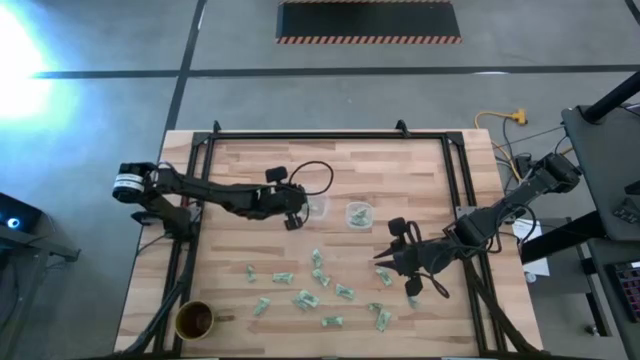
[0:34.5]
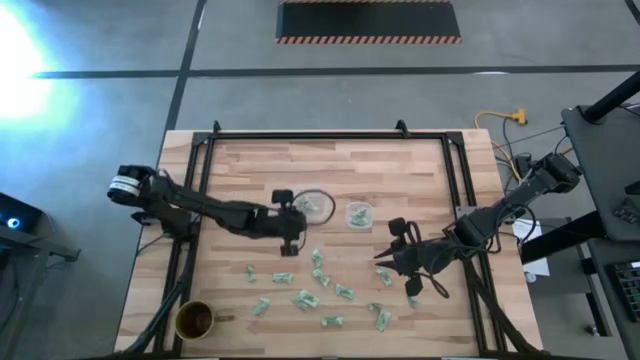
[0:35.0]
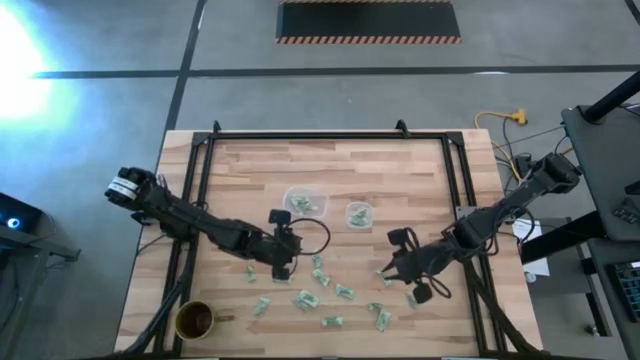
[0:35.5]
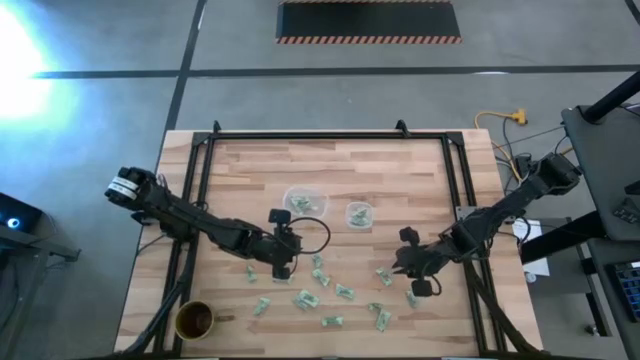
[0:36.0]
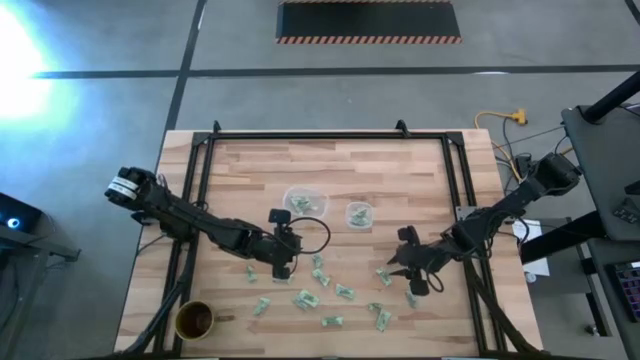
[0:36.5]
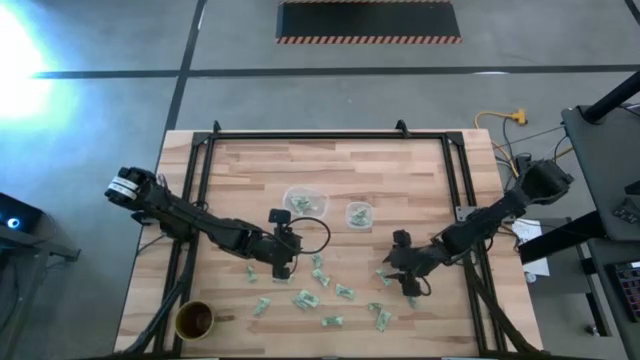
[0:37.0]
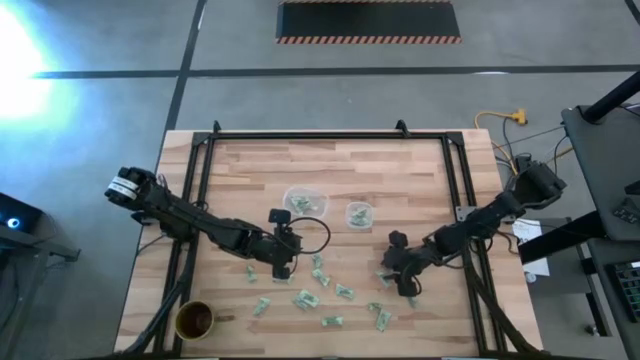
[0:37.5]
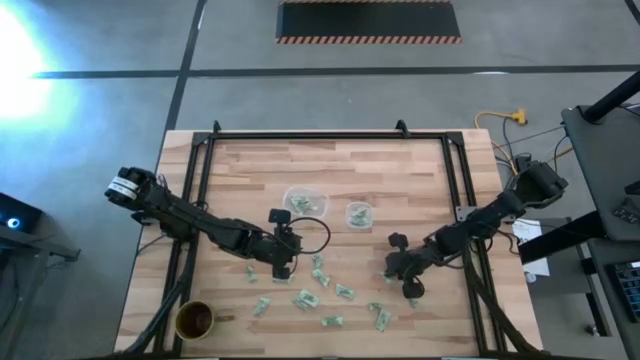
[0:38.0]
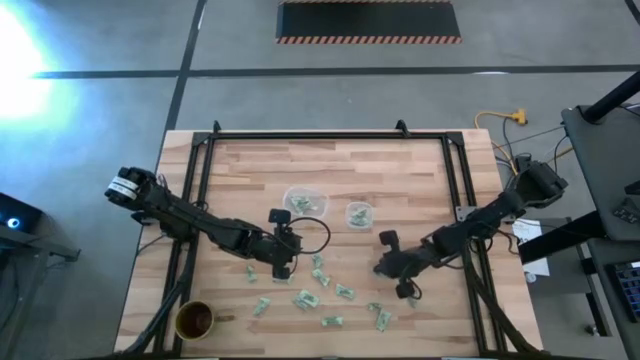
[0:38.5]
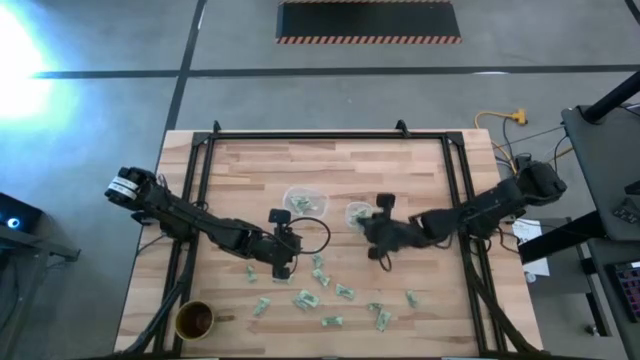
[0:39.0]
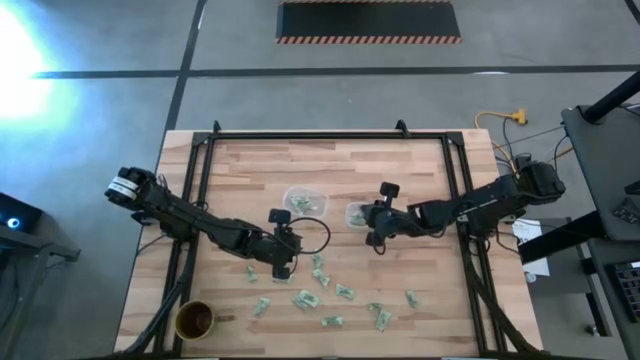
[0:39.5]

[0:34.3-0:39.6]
Task: Pick and place items into bin
Put the green stevia packet into the right transparent bin

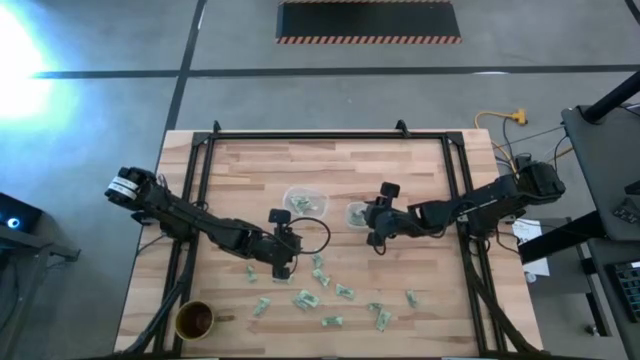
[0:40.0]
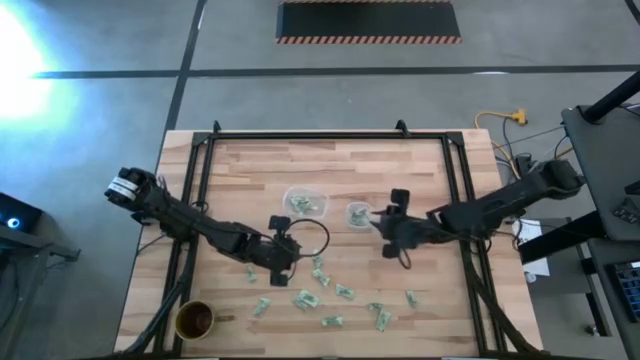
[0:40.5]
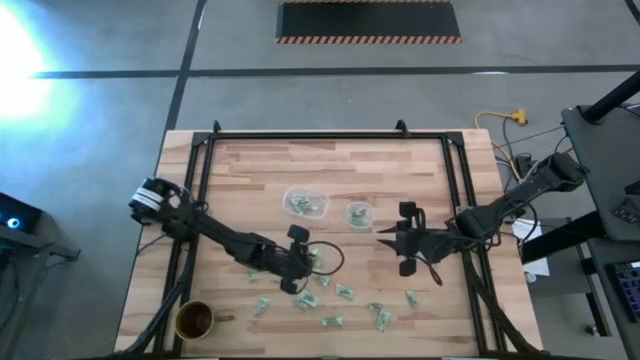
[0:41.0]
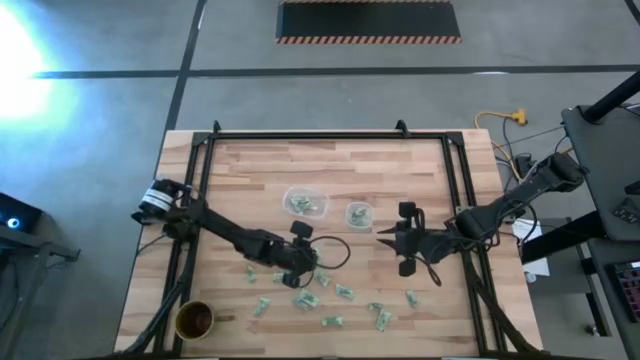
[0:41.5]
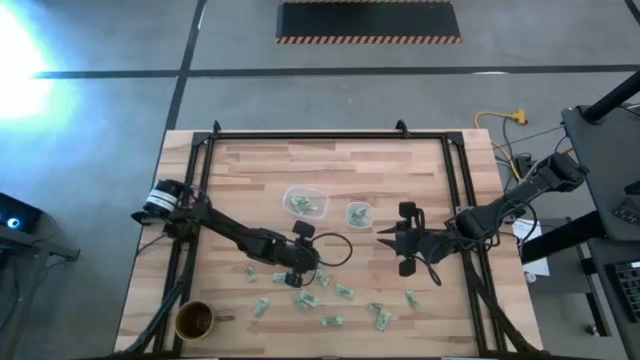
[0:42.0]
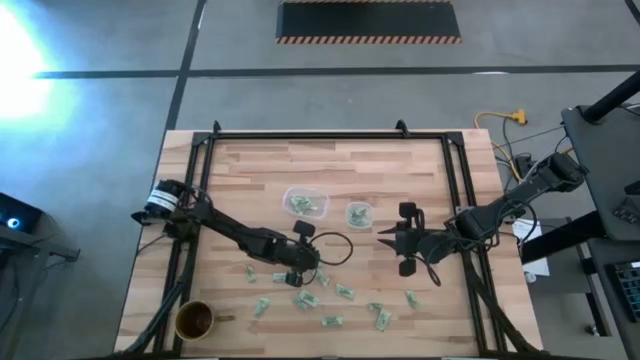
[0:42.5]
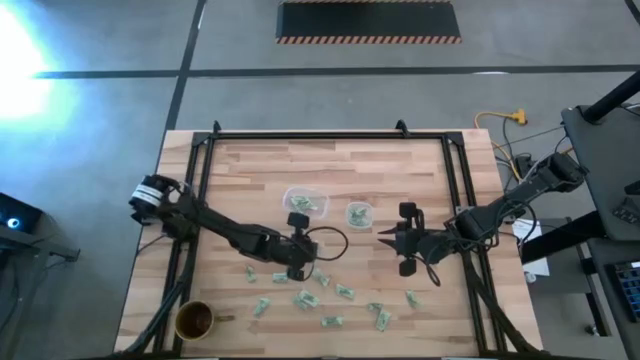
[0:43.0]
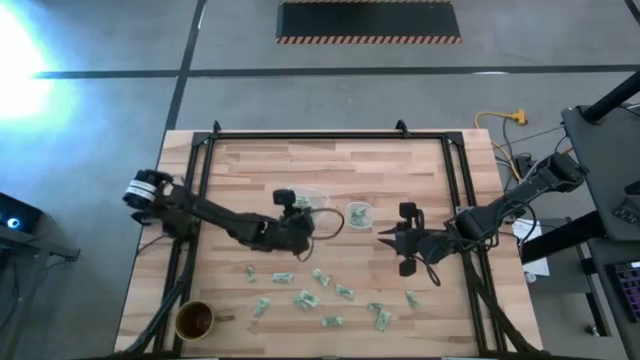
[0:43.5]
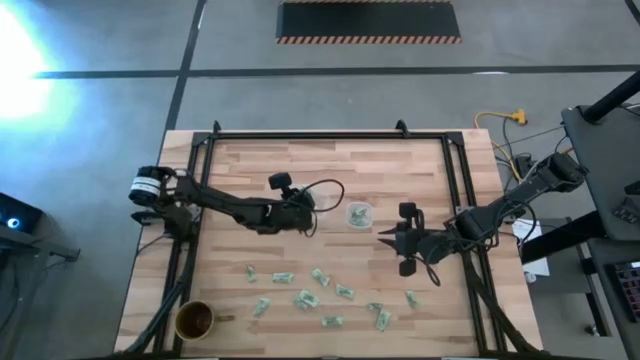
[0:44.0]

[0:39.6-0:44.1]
Put the green stevia packet into the left transparent bin

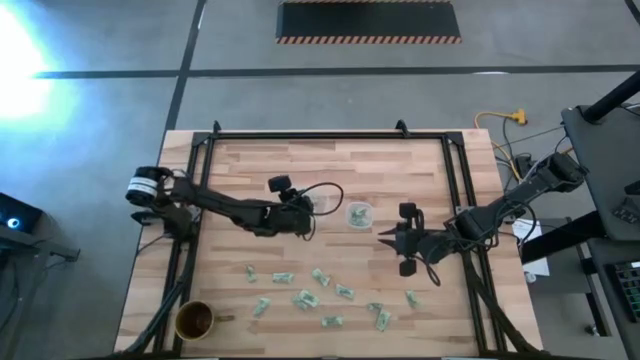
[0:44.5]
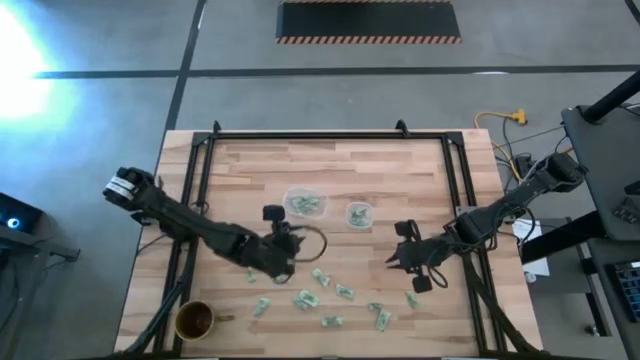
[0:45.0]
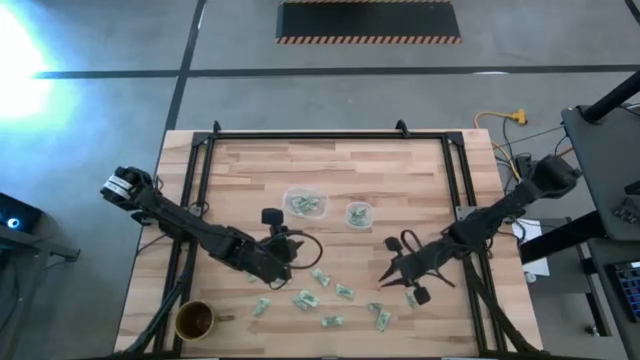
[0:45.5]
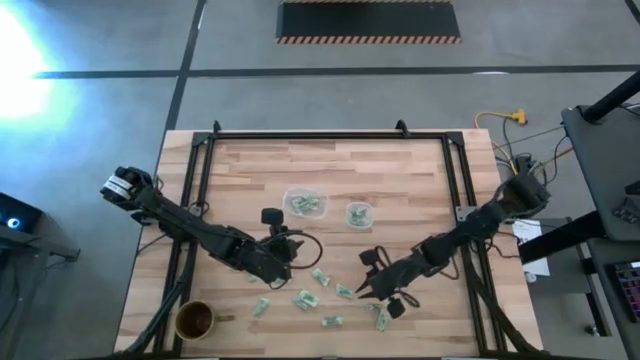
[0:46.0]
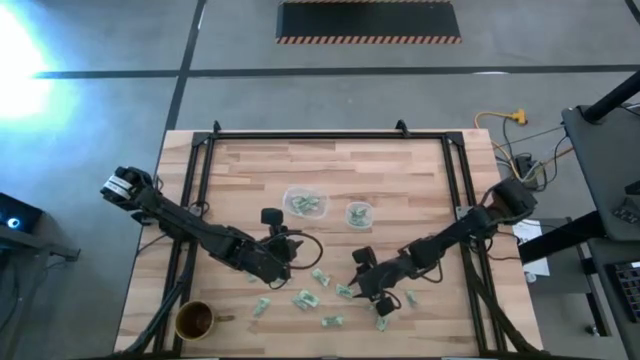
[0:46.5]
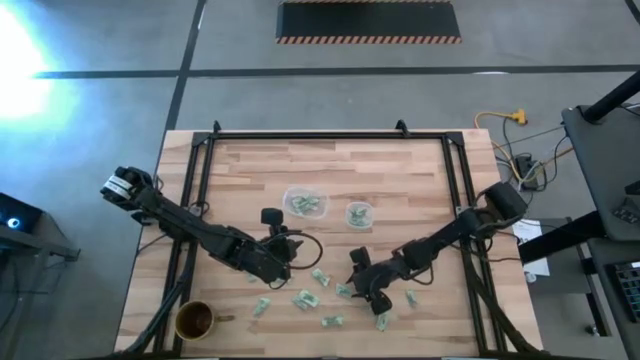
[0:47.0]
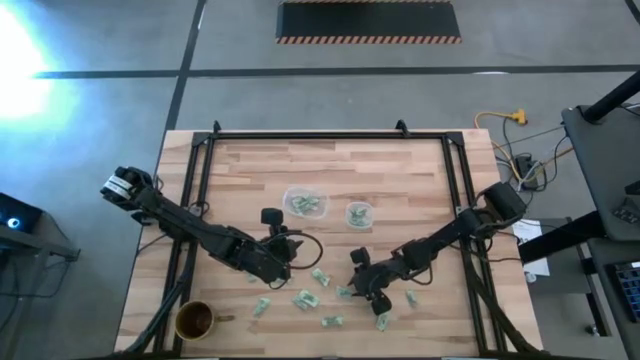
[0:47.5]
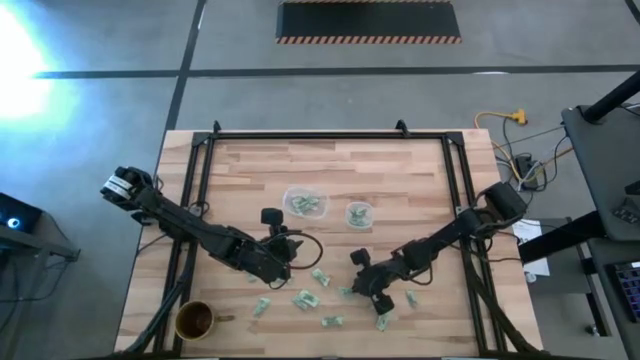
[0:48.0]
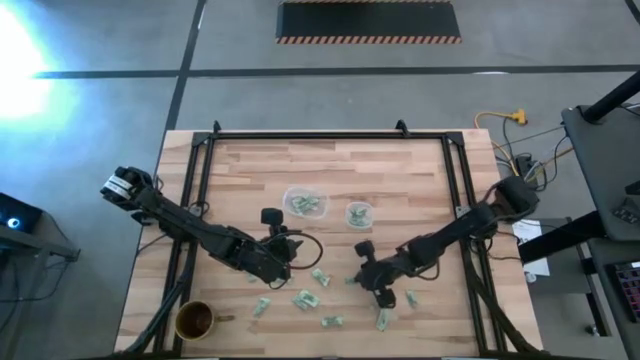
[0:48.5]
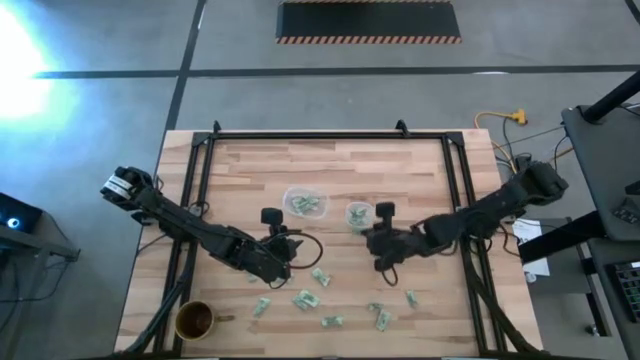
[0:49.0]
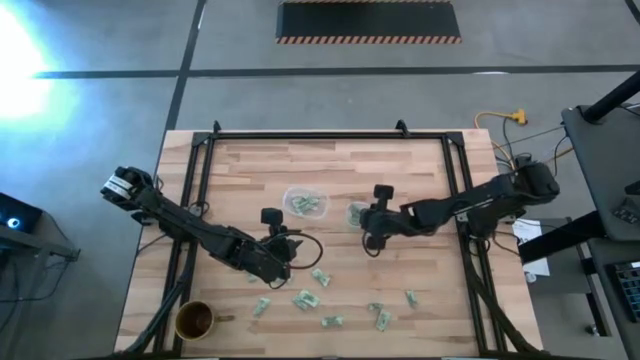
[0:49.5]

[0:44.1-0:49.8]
Put the green stevia packet into the right transparent bin

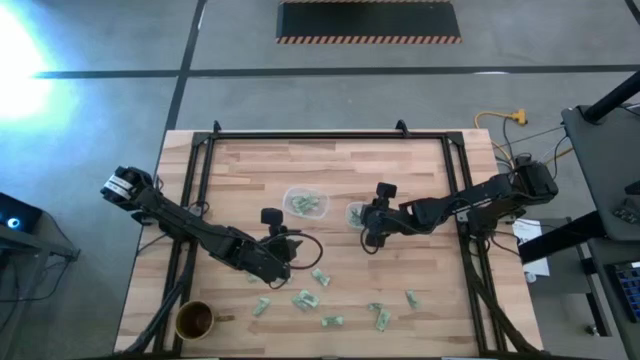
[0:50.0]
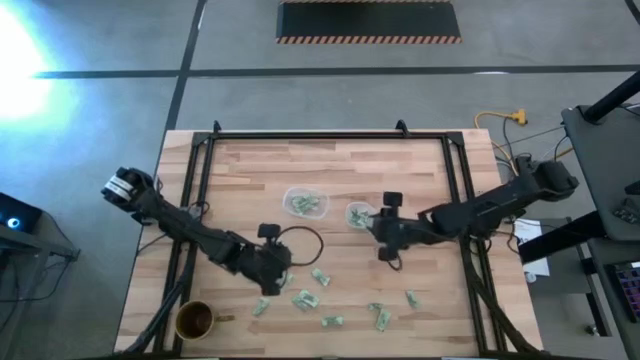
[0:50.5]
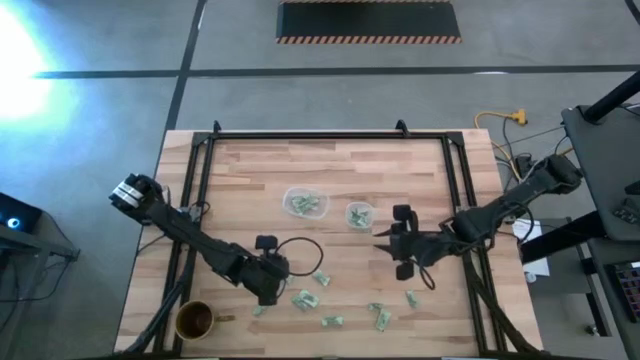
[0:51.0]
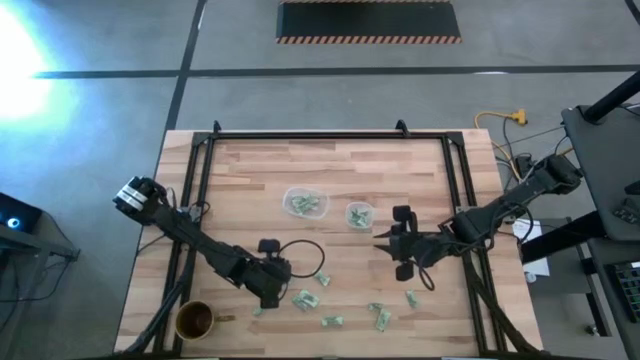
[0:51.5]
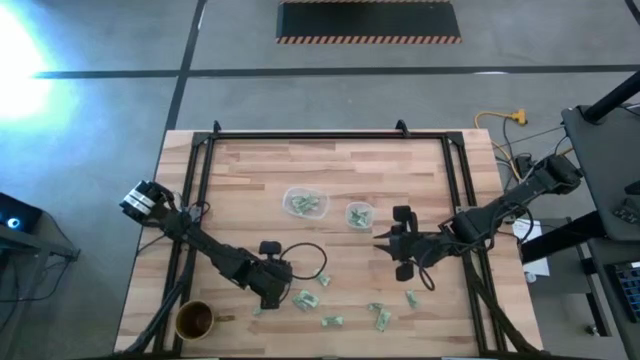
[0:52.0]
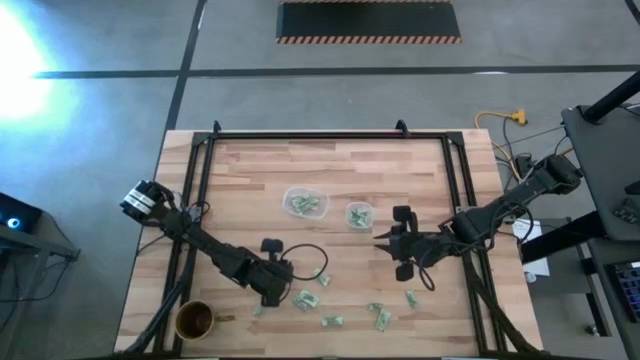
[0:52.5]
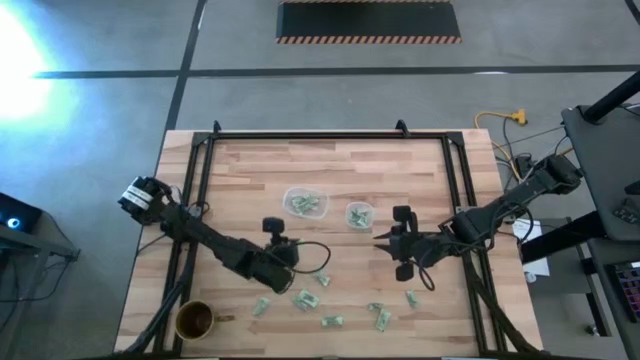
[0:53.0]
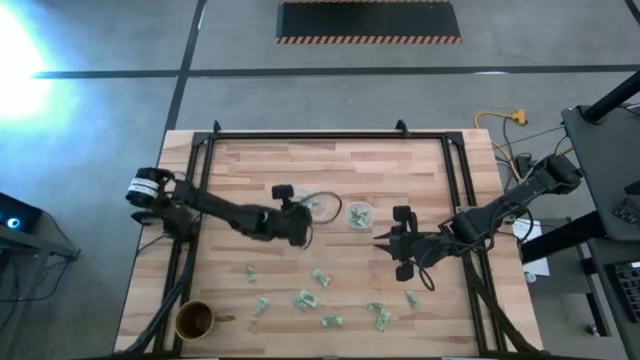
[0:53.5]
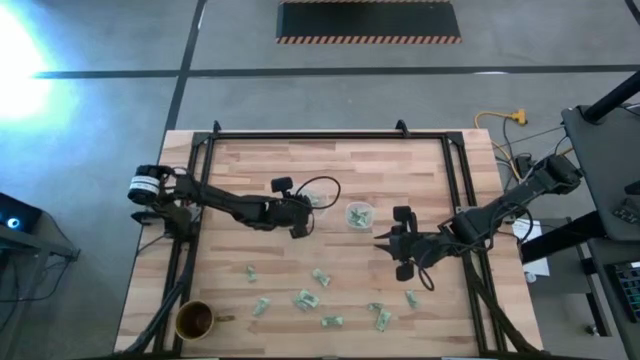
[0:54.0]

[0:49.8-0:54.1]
Put the green stevia packet into the left transparent bin

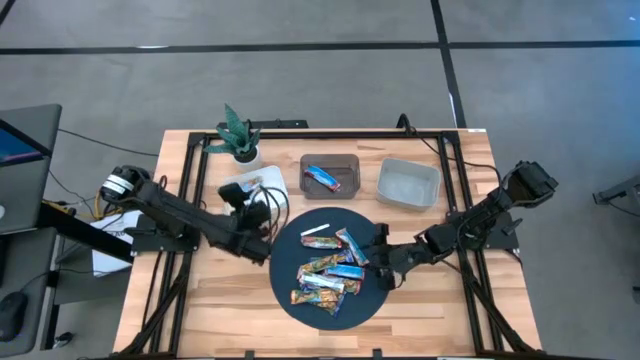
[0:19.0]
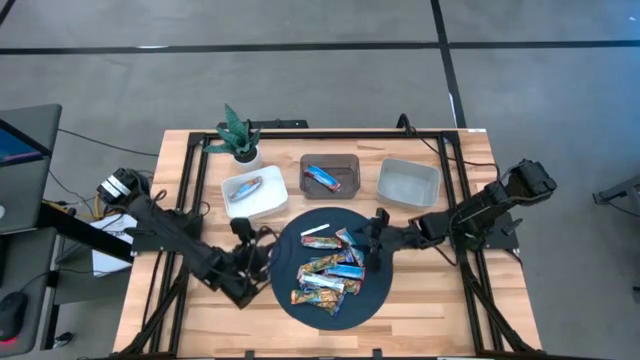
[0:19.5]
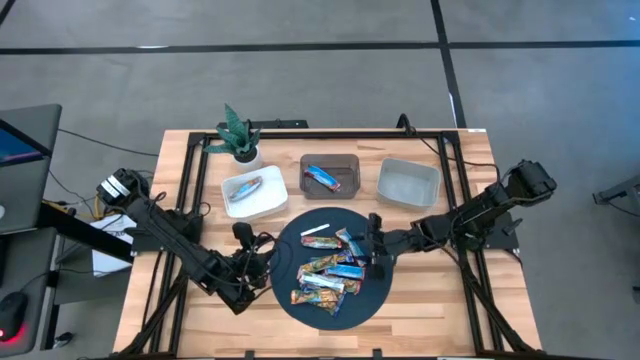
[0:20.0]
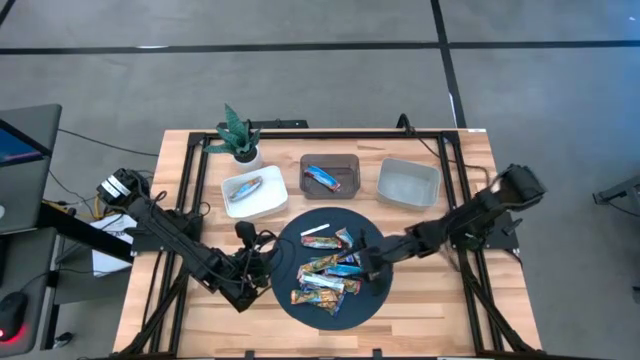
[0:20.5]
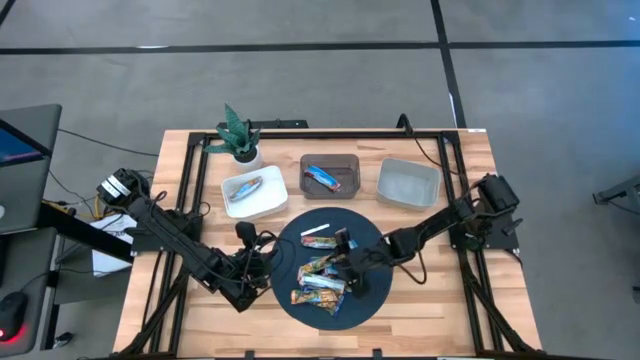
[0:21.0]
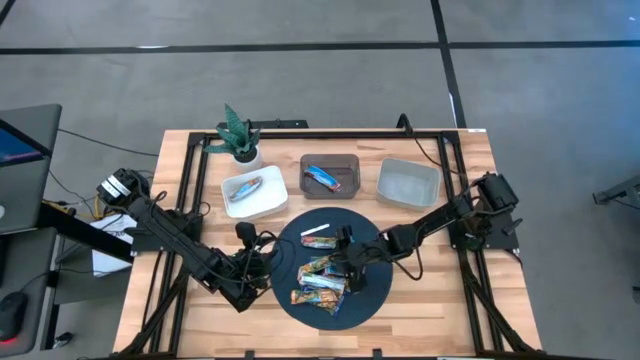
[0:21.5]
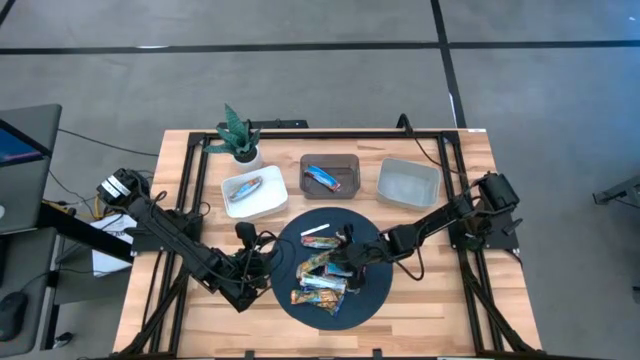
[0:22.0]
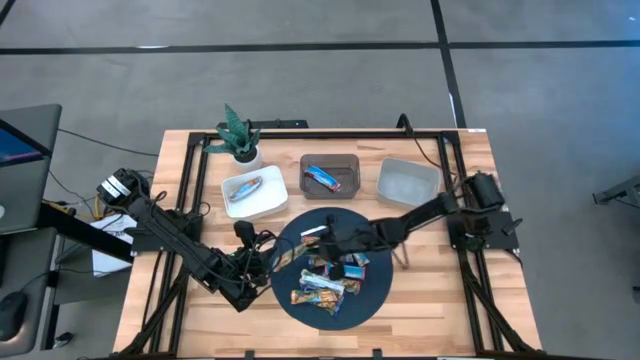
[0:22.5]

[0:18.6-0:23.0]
Task: Pick and place Granola Bars by type
Adjust the orange granola bar
